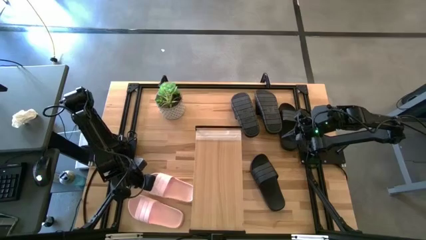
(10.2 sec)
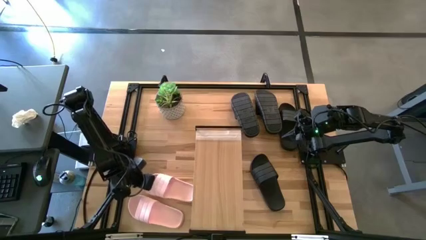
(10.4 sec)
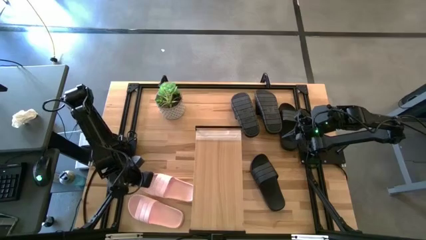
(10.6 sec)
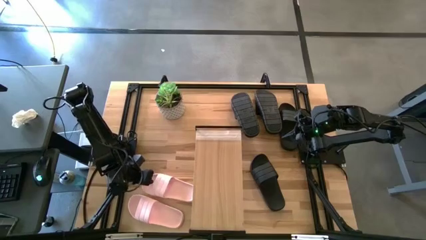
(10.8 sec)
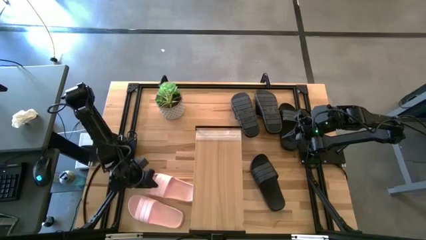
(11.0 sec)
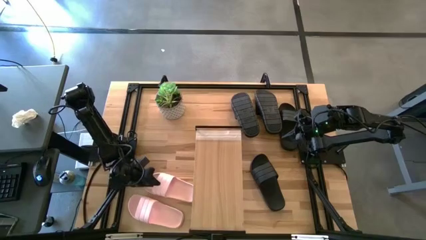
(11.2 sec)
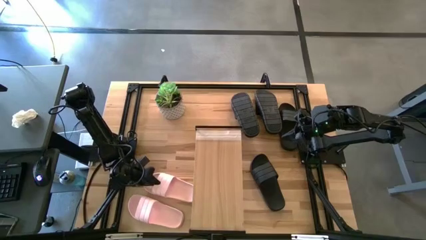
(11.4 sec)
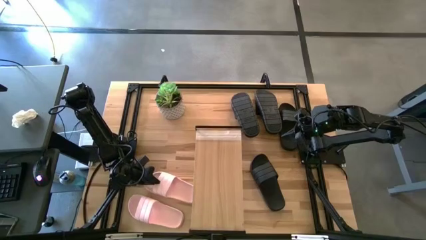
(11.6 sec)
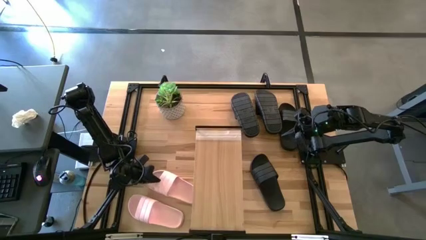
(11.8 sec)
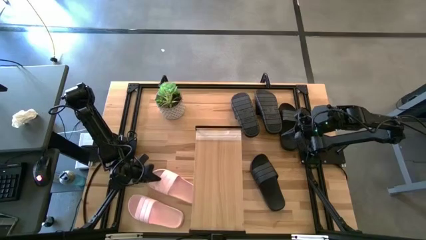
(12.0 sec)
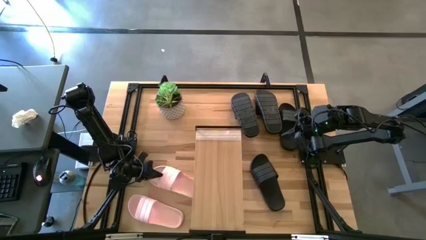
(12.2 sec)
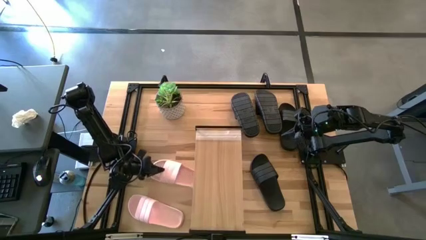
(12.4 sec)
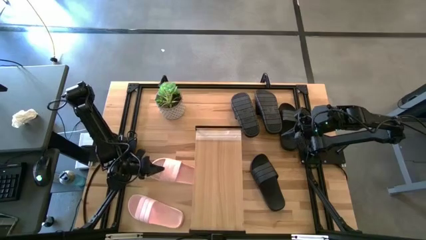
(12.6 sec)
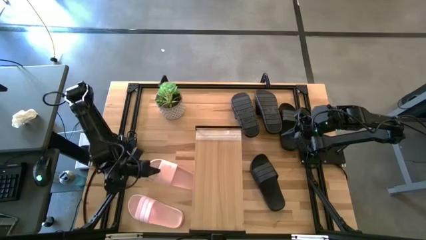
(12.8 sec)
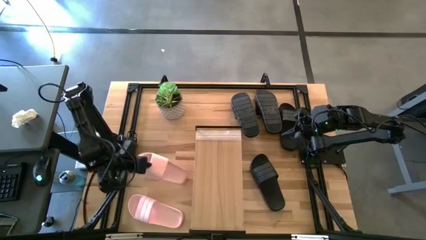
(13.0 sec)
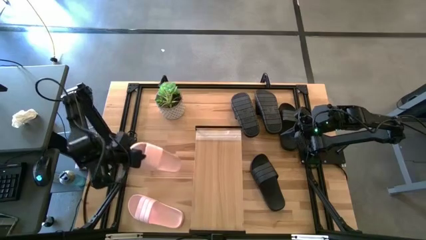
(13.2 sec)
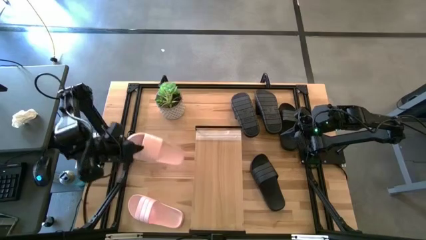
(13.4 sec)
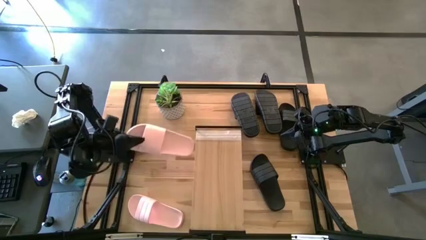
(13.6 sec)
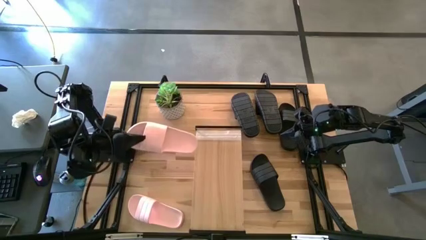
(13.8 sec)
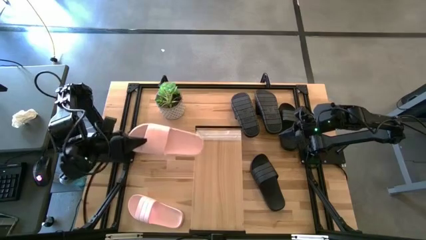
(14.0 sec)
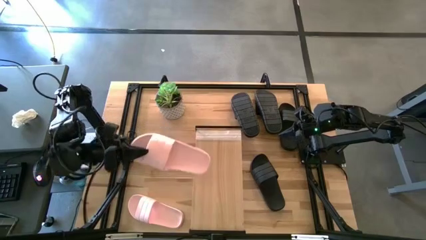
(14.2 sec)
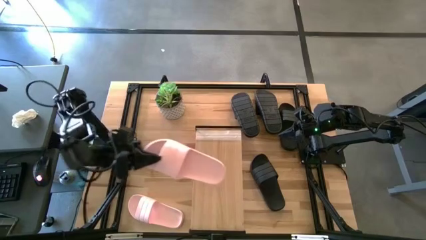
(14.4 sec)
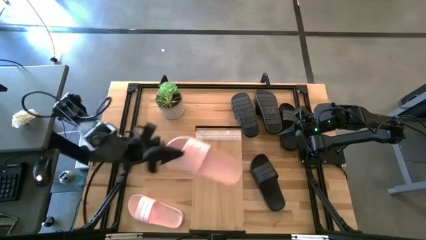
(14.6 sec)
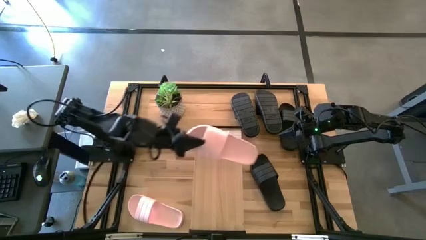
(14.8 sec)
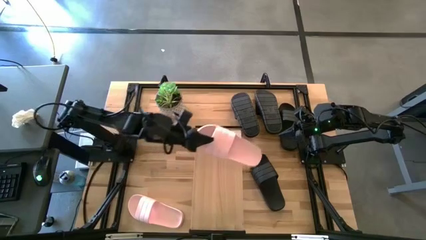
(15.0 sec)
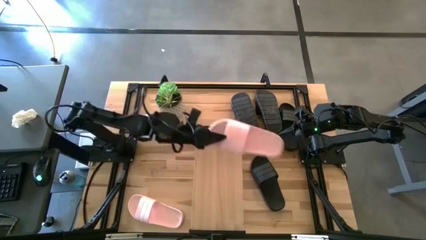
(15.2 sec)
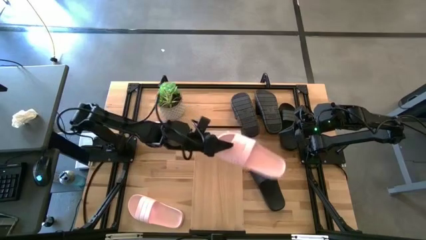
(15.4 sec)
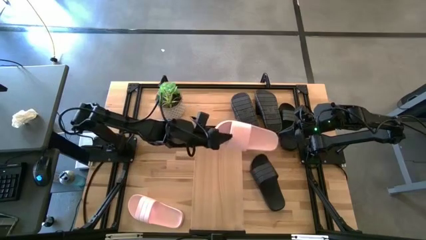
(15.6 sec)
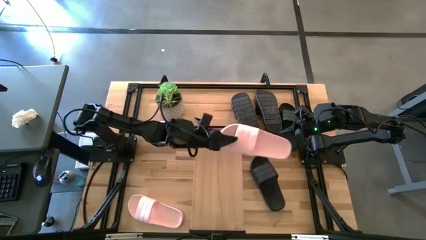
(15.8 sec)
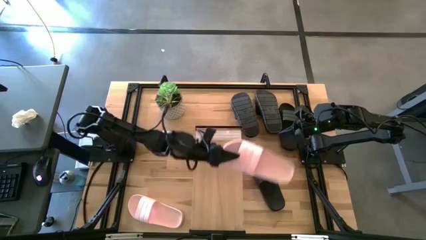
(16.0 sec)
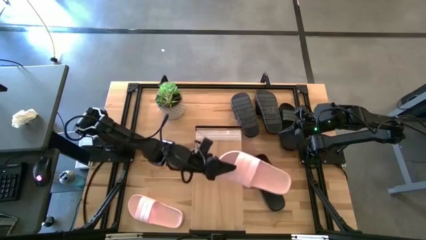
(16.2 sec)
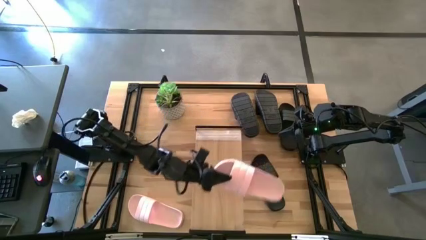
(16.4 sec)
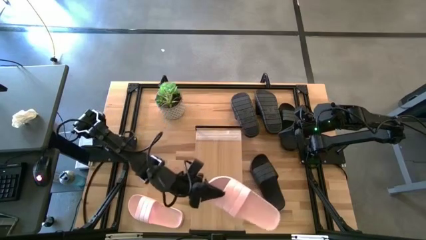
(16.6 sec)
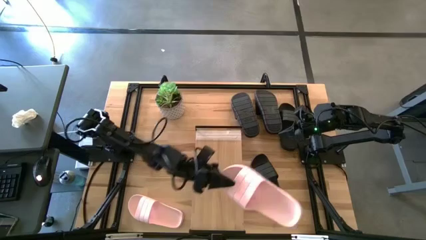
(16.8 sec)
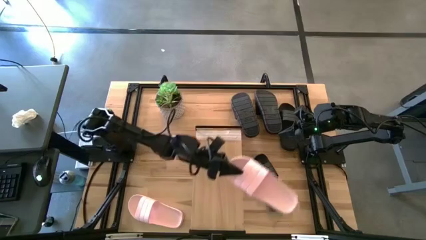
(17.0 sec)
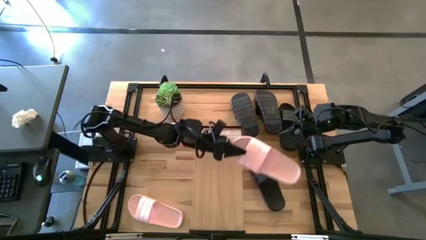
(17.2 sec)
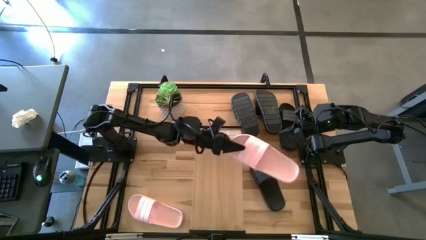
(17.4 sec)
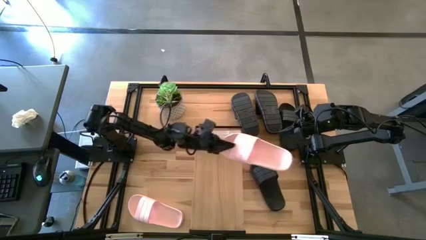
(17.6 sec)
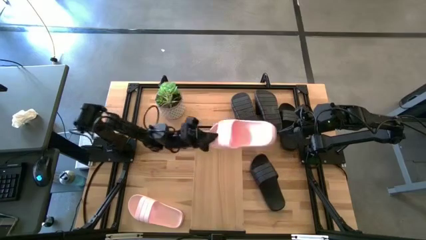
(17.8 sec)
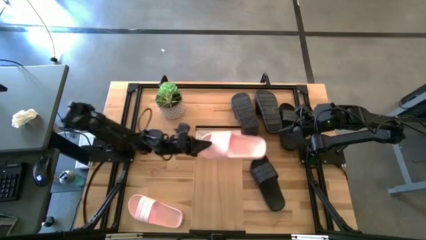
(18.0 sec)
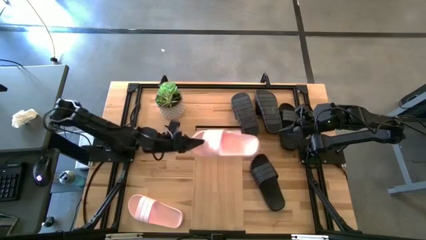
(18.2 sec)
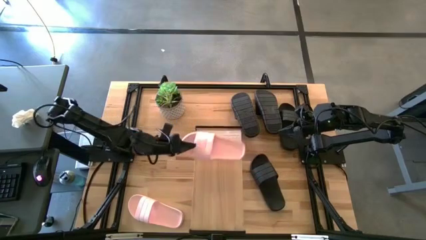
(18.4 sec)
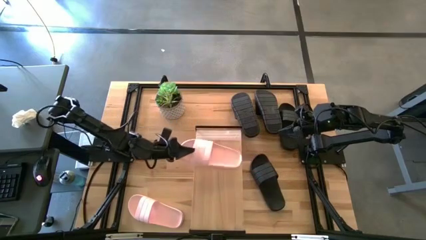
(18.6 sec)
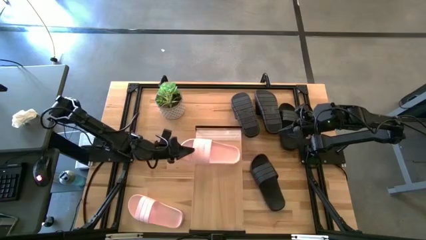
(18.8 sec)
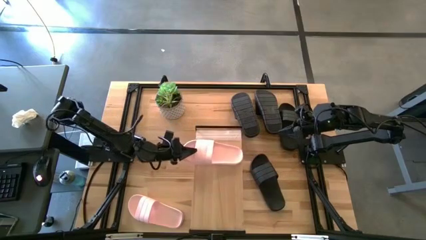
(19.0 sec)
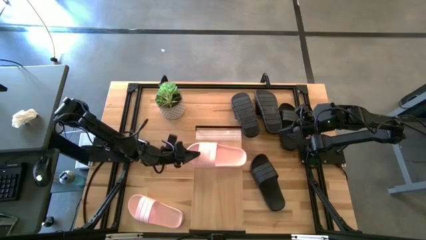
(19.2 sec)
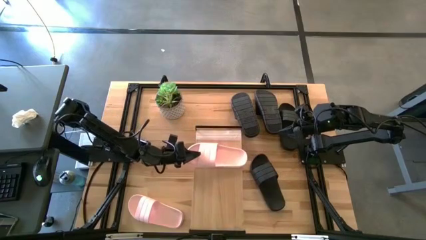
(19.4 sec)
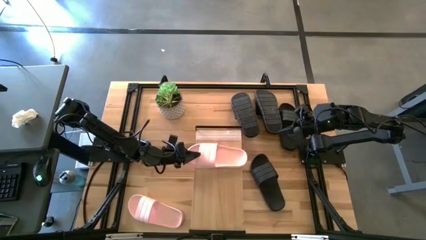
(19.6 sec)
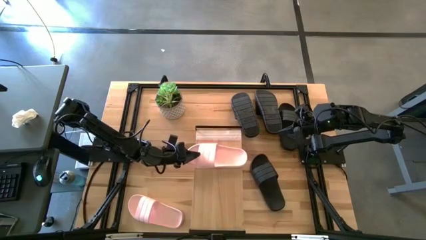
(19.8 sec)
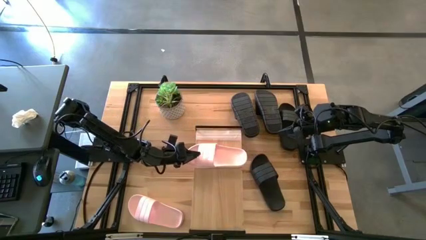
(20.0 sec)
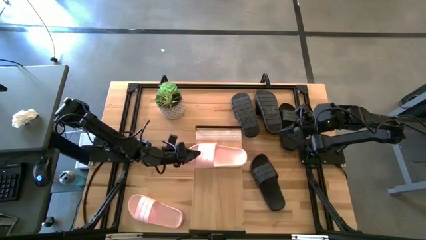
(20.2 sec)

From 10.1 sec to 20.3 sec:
Task: Pick and place slides into the shelf
Put the top pink slipper on the shelf

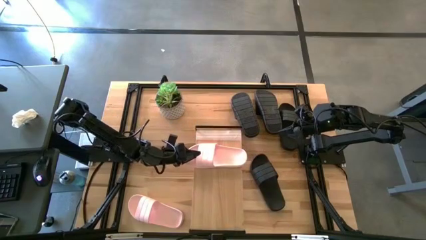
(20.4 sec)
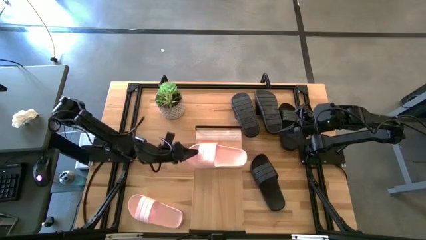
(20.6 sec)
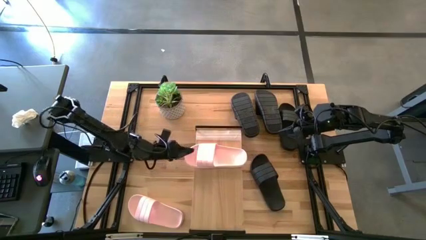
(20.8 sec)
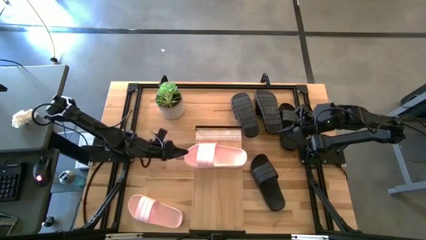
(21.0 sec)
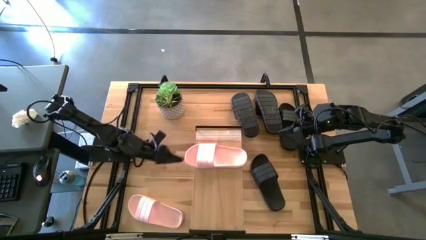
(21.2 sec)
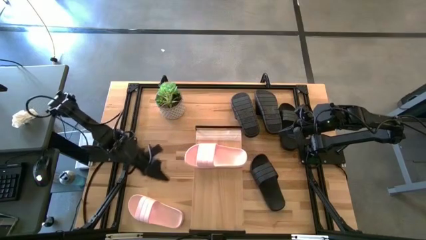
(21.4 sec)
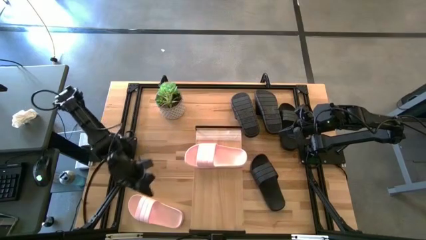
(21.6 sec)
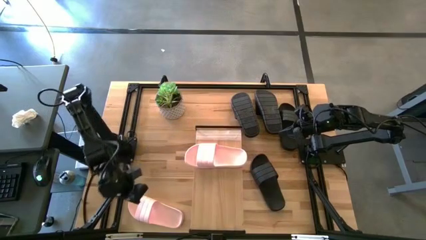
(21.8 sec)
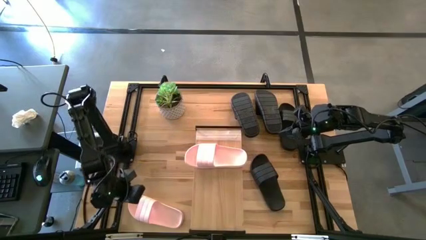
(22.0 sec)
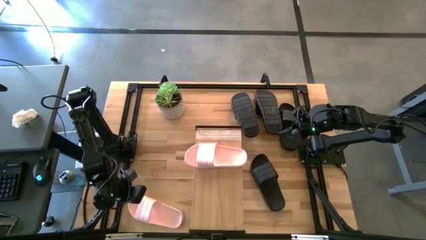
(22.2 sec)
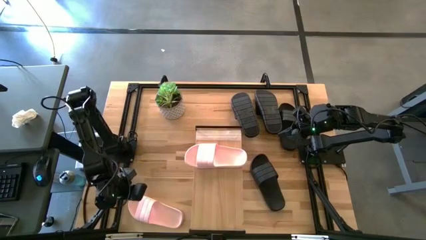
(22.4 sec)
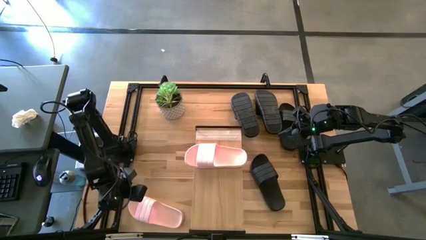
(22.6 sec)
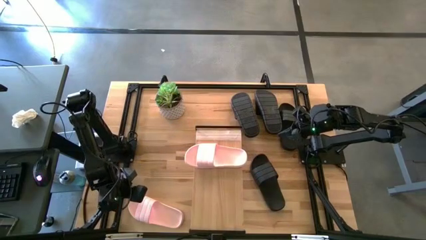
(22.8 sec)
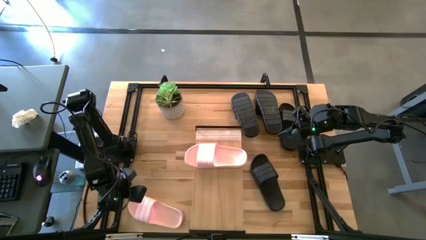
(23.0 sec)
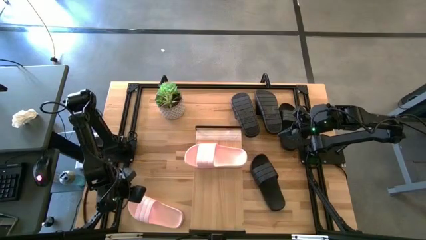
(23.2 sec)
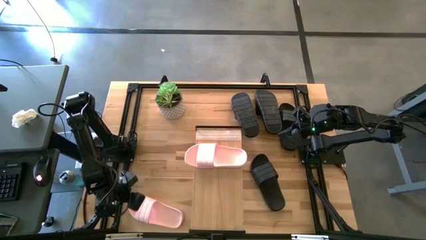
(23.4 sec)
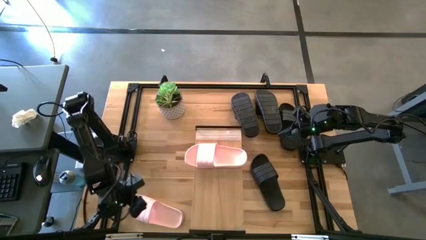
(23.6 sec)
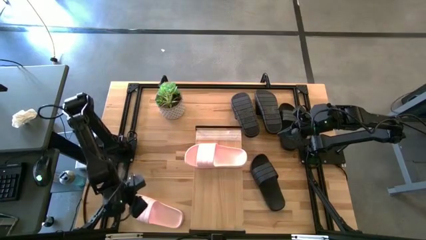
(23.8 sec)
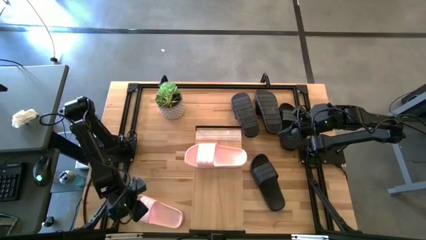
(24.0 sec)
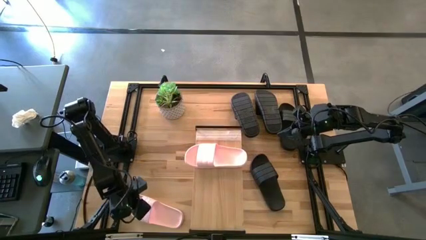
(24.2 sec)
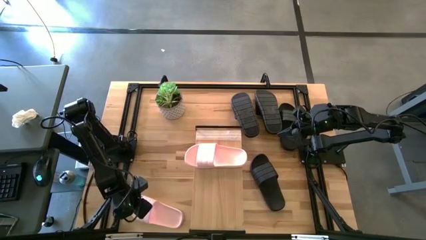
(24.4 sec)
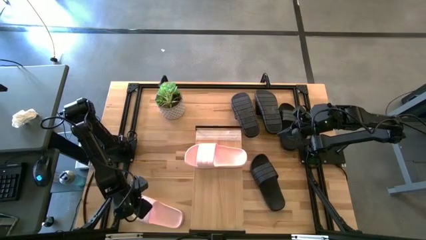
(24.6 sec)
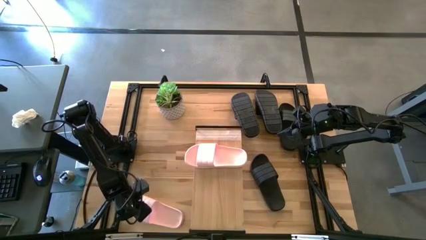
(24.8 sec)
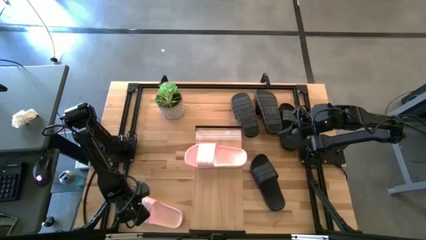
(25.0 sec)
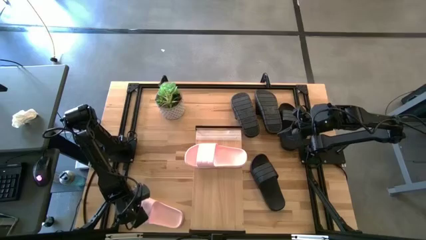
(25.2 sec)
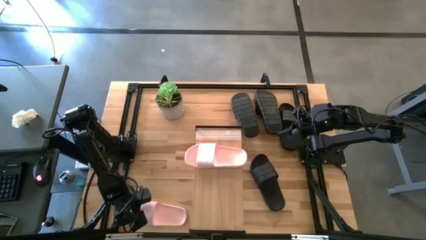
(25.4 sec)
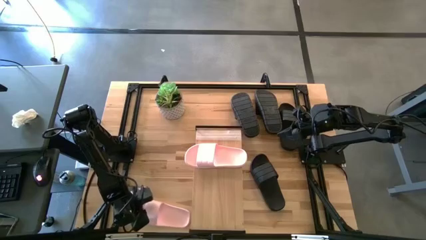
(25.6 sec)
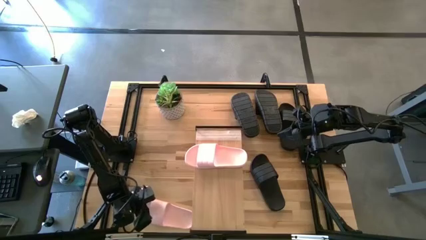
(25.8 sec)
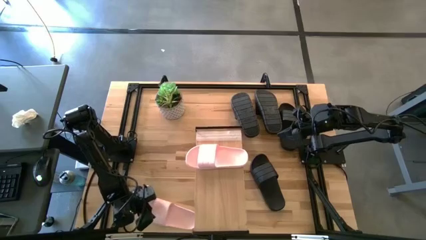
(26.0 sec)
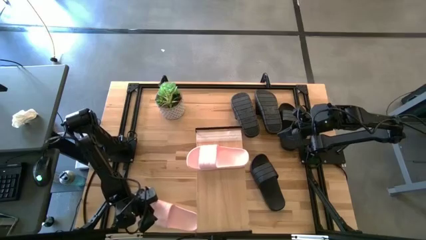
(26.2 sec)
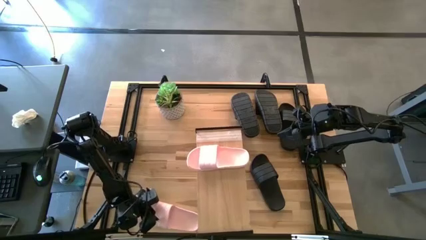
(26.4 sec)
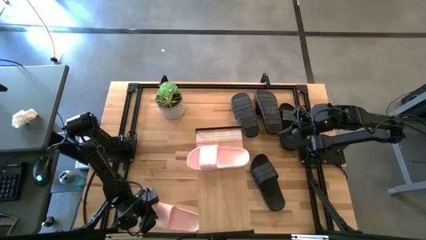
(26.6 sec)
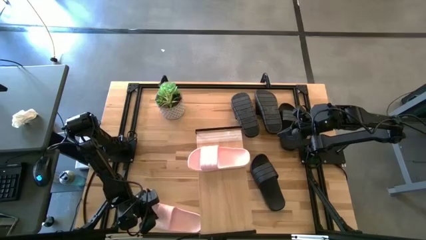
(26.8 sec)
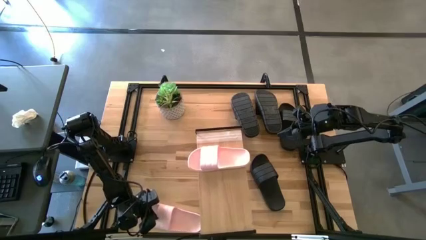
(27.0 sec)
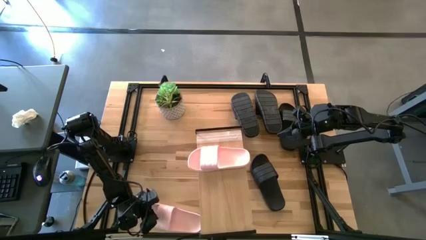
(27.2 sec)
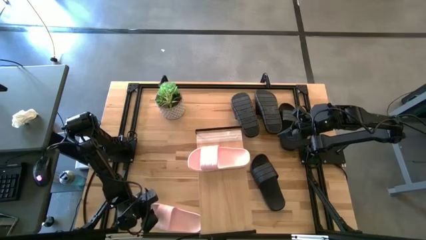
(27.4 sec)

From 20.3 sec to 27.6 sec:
Put the pink slipper on the shelf
